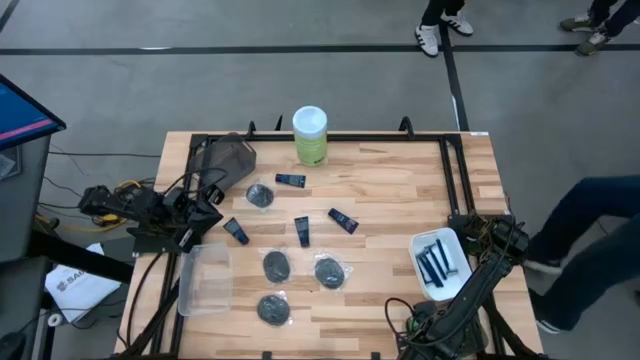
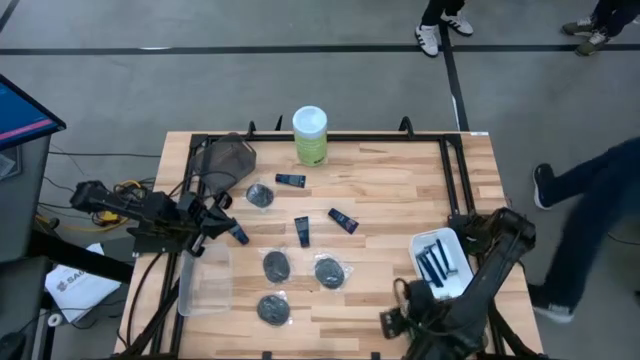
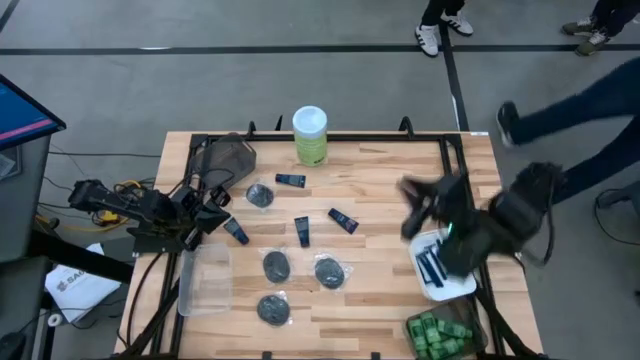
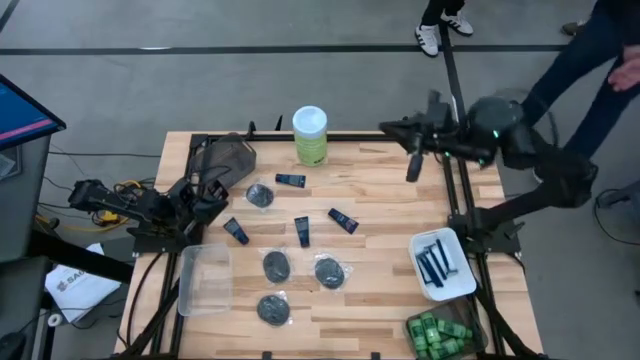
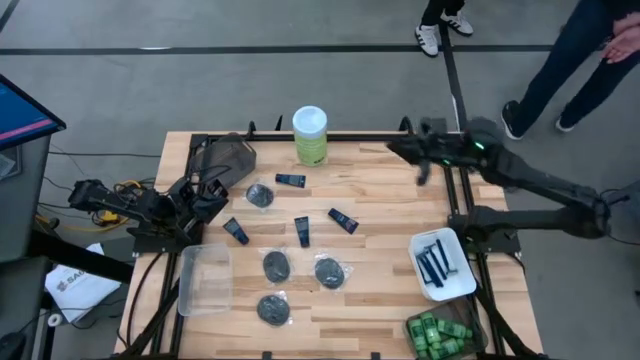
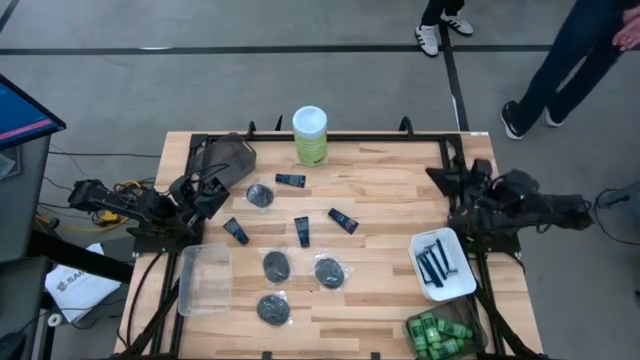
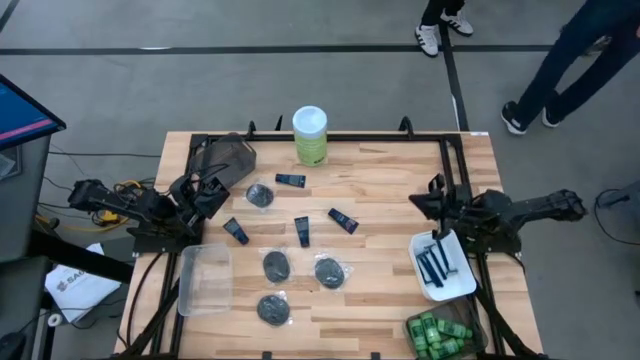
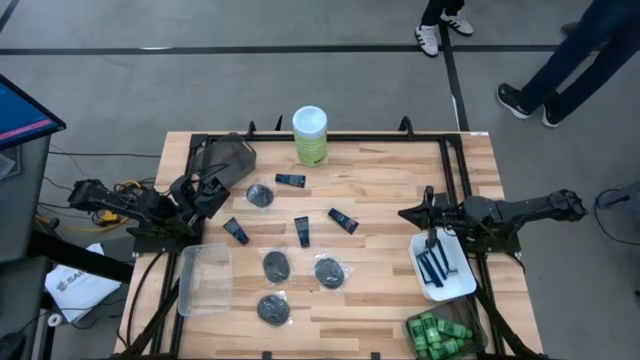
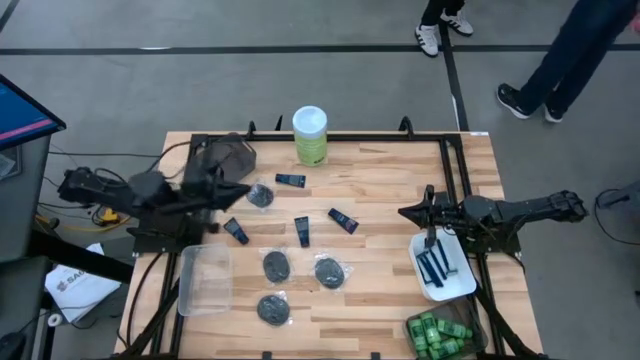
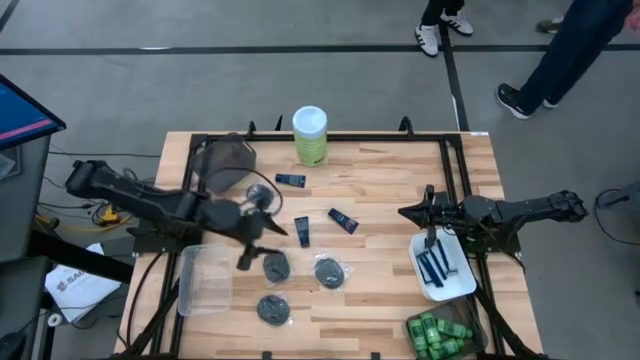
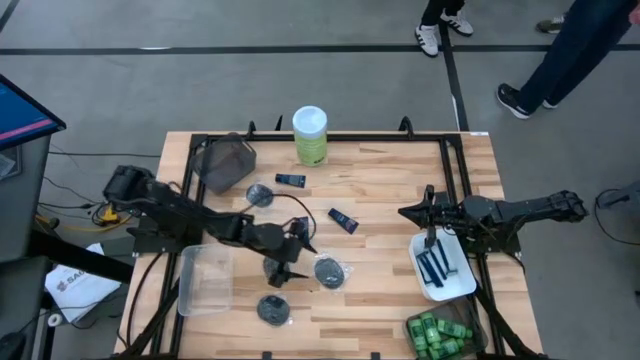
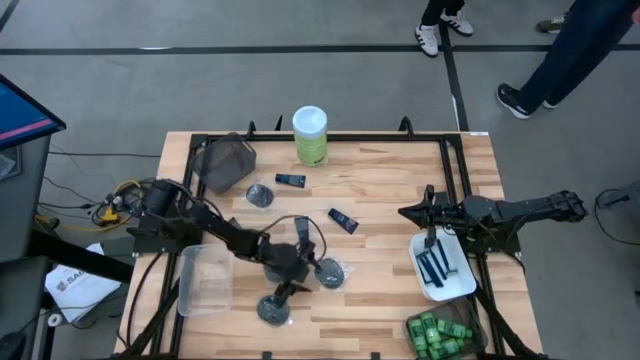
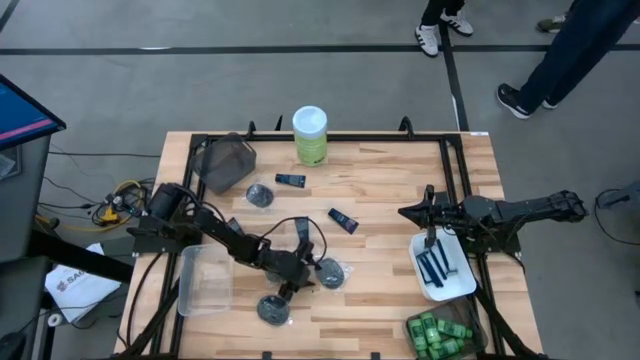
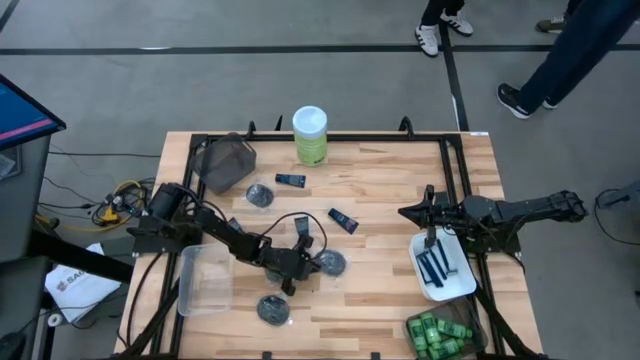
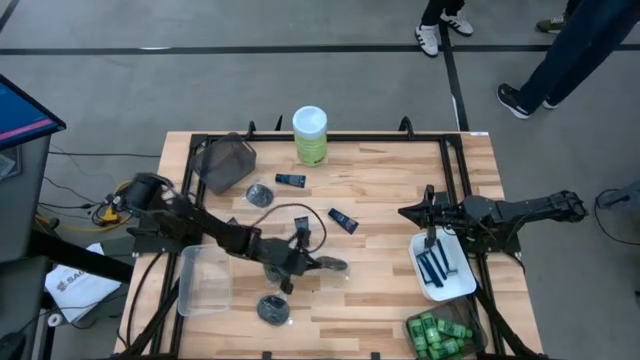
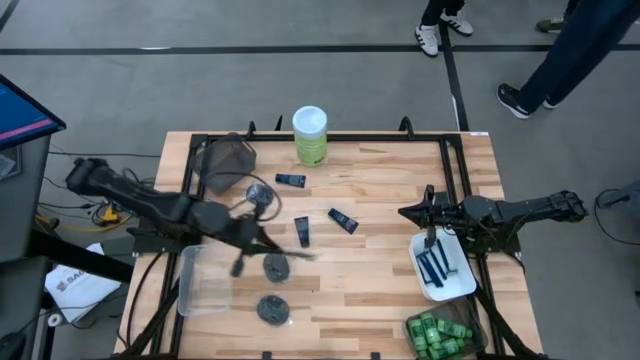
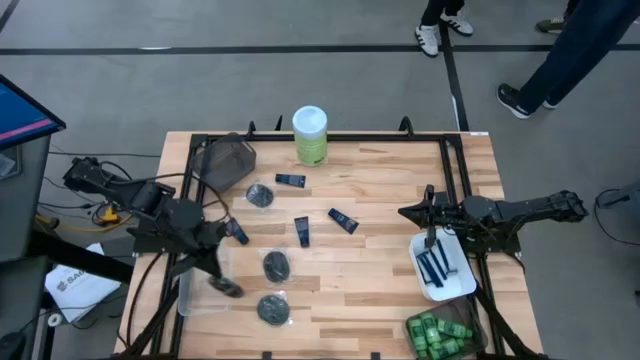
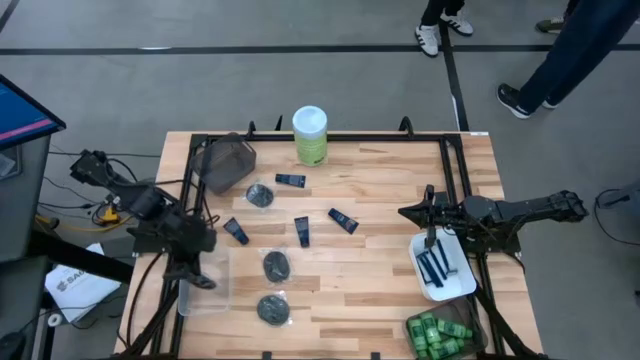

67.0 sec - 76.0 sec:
Task: Pick & Place Travel size toiletries
Put the black hairbrush into the transparent bin

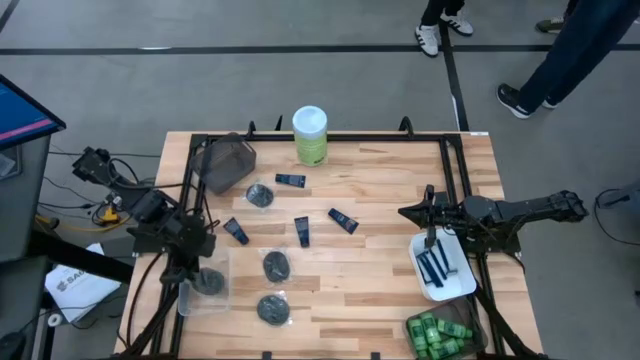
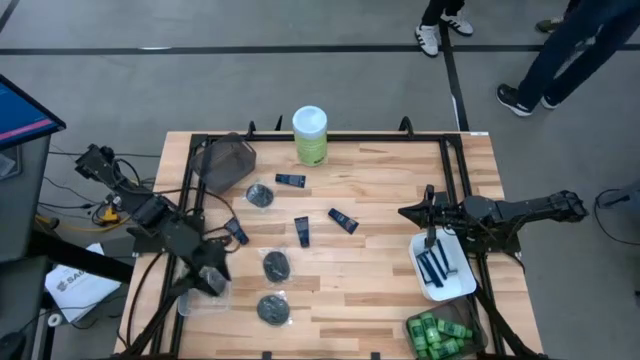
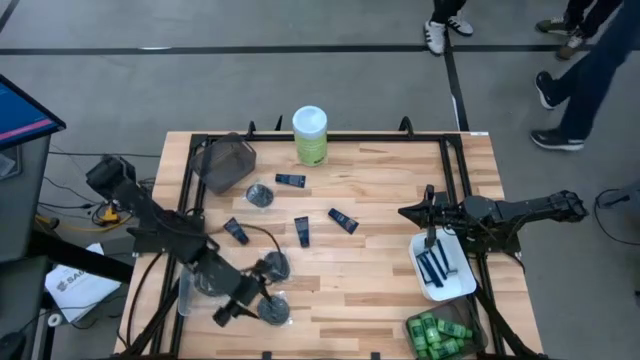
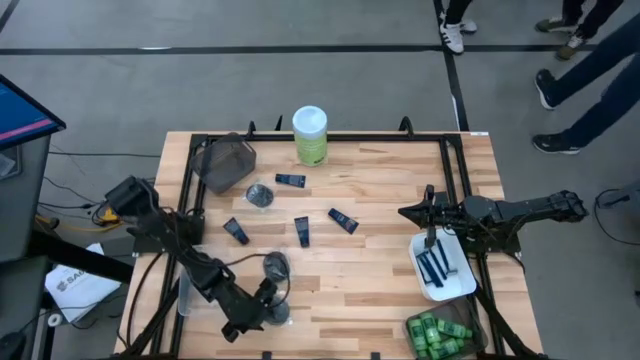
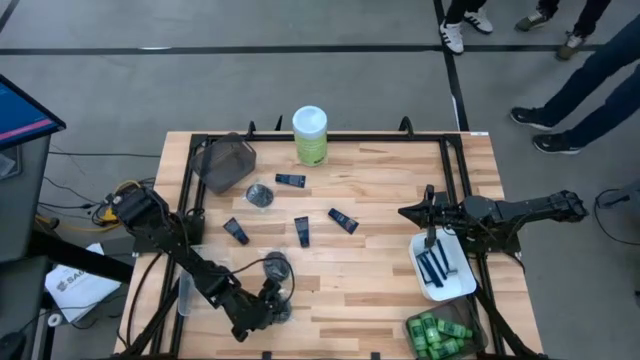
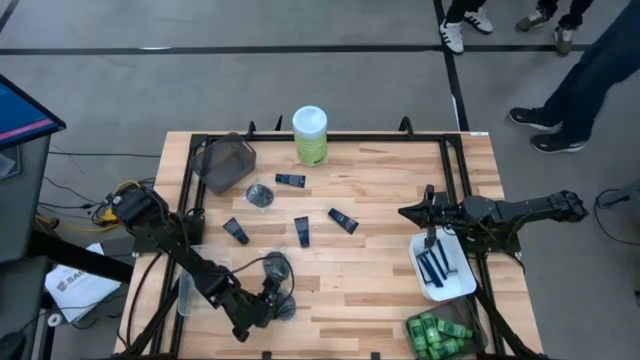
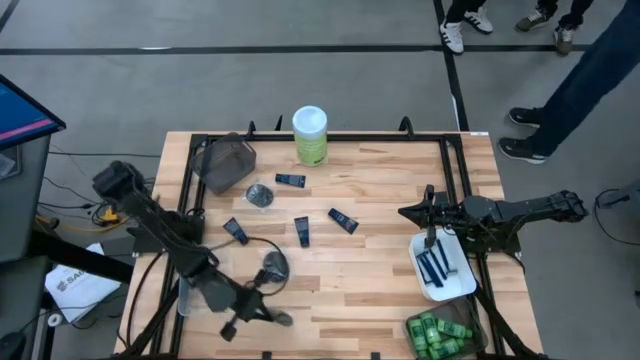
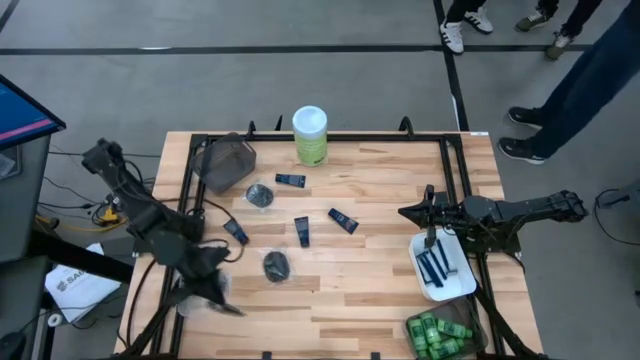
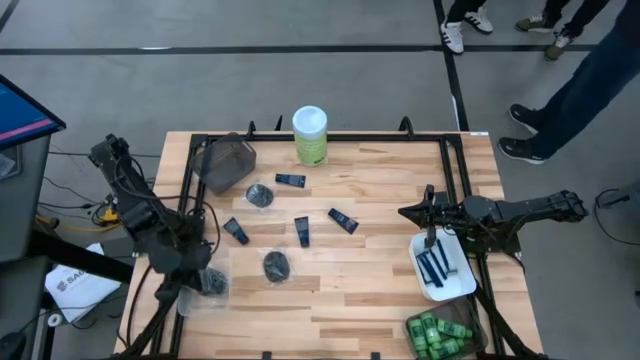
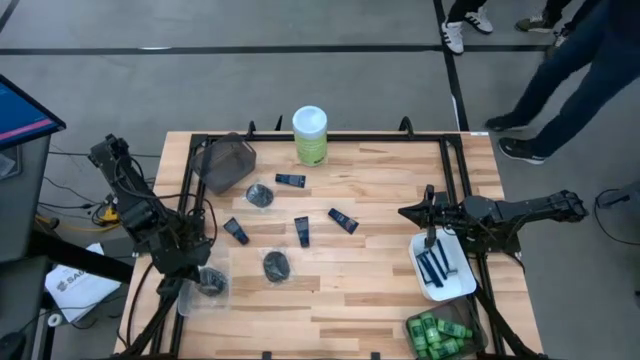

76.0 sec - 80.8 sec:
Put the black hairbrush into the transparent bin

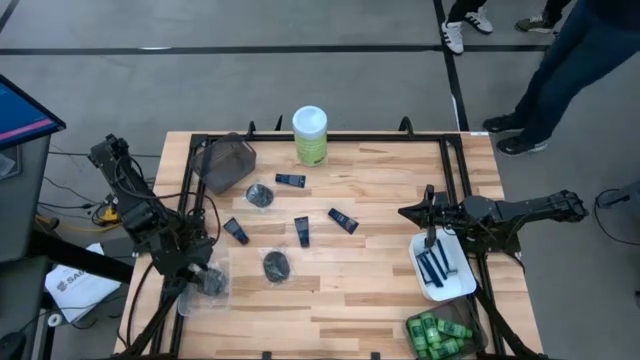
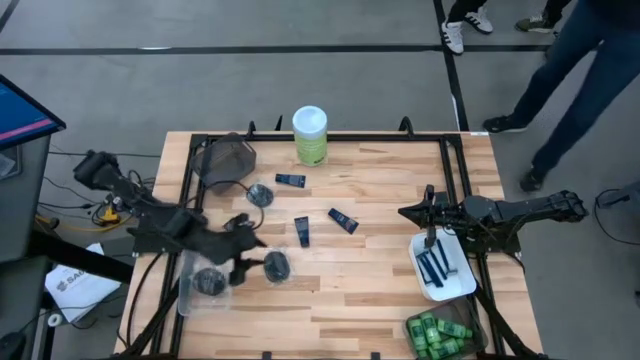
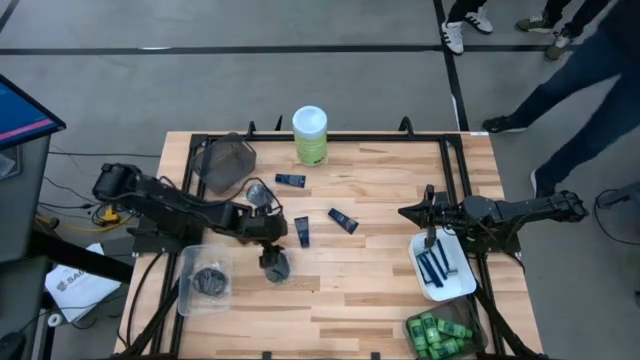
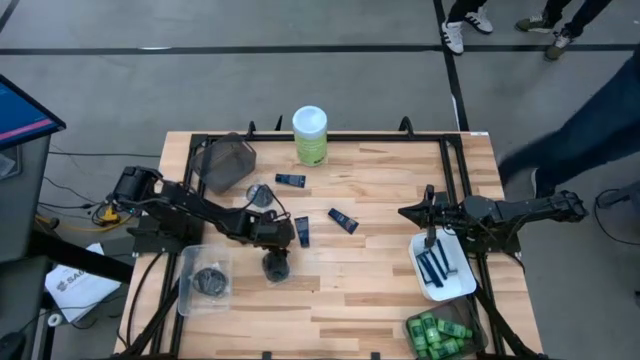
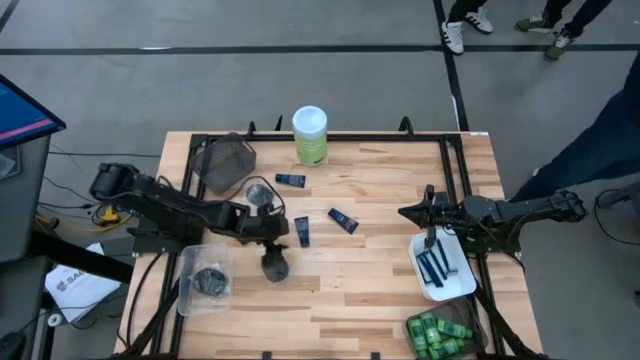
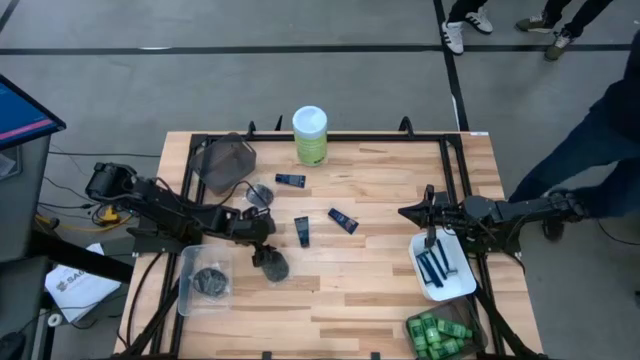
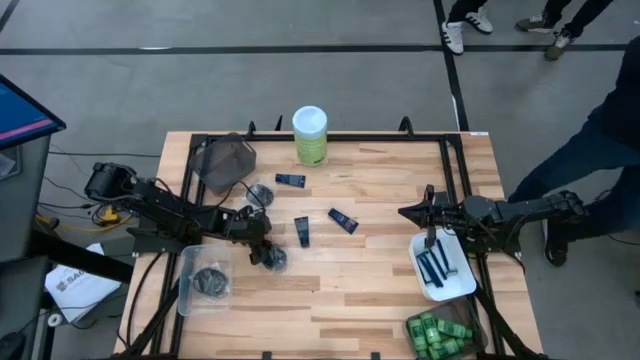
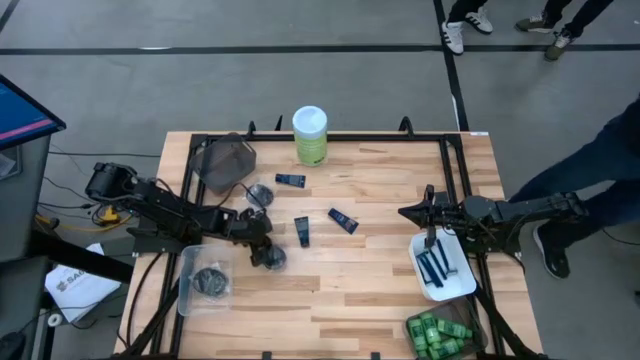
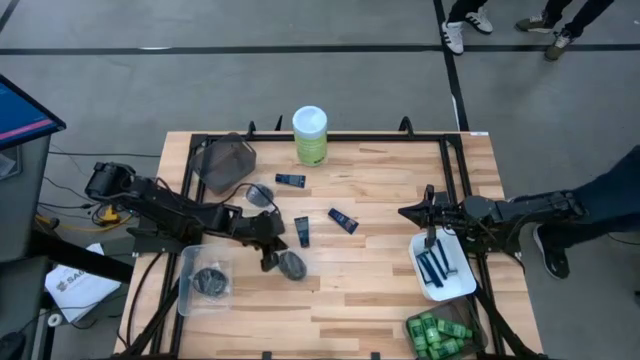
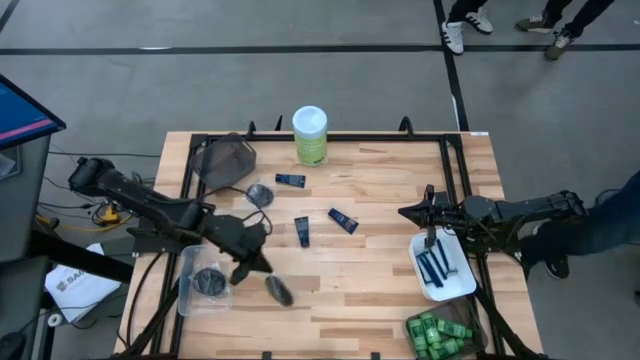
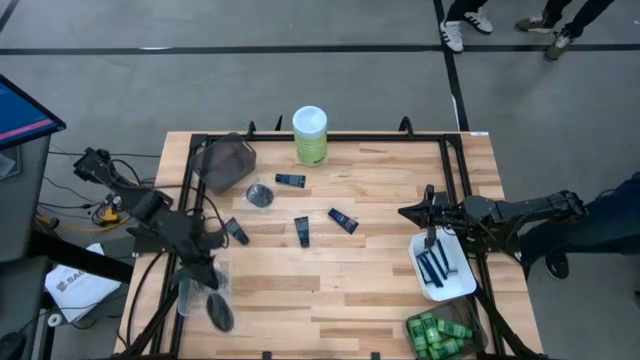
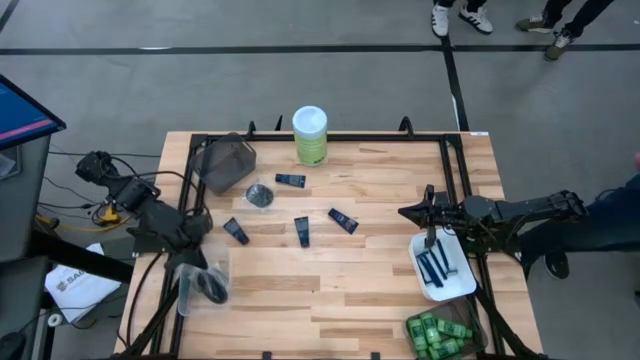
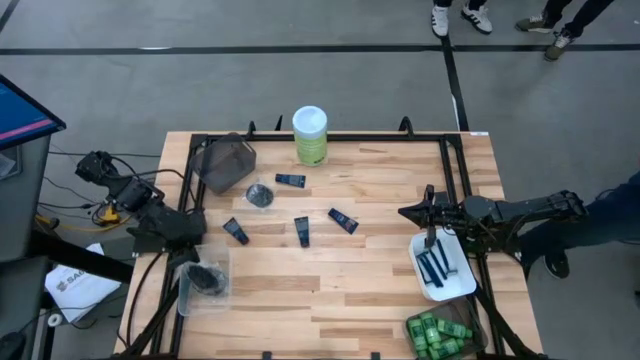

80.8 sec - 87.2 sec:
Put the black hairbrush into the transparent bin
